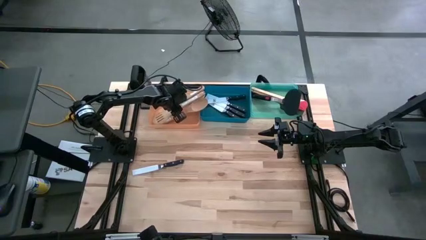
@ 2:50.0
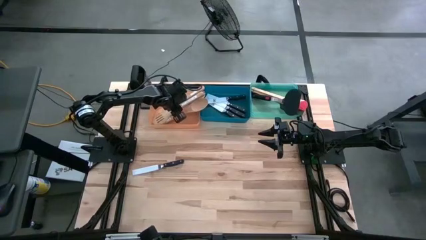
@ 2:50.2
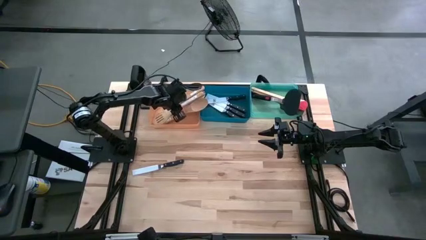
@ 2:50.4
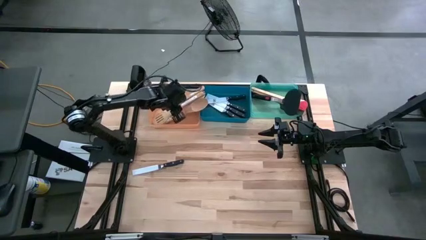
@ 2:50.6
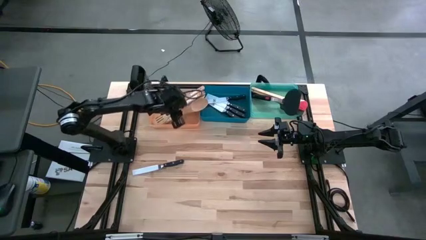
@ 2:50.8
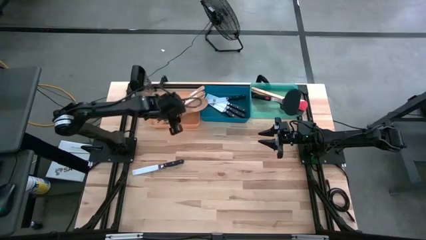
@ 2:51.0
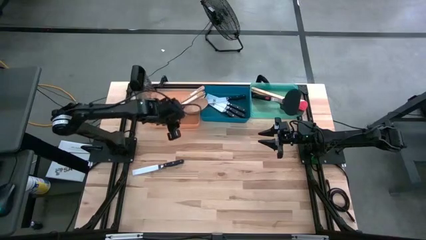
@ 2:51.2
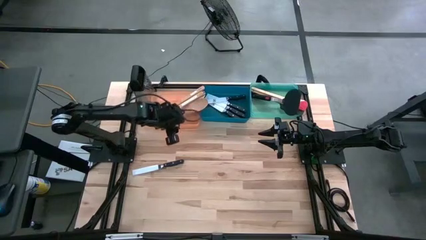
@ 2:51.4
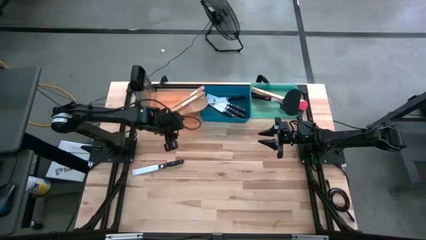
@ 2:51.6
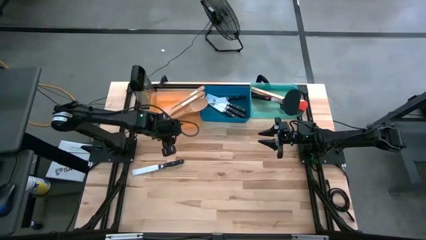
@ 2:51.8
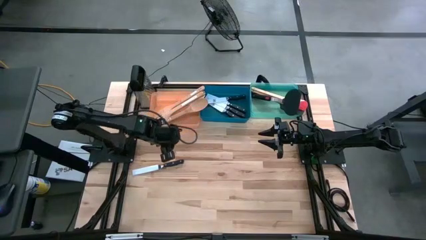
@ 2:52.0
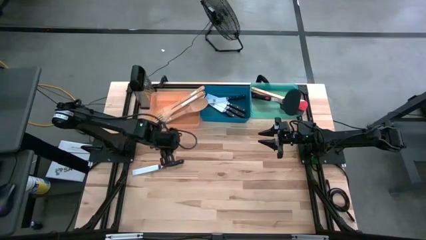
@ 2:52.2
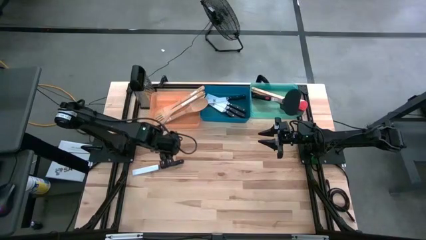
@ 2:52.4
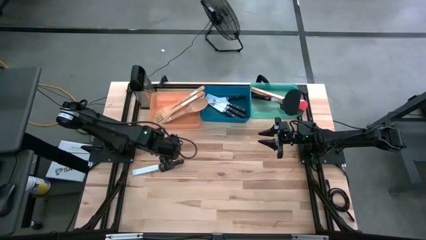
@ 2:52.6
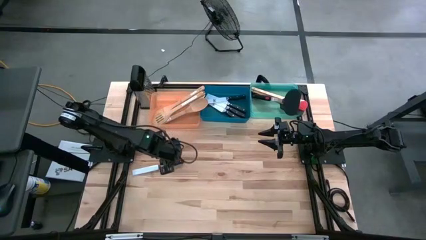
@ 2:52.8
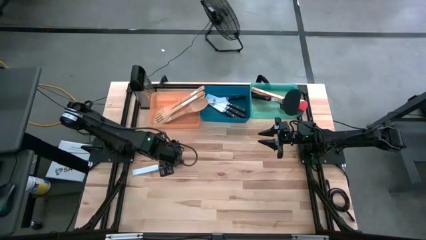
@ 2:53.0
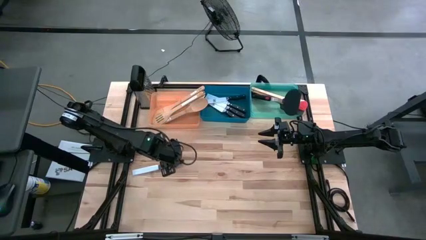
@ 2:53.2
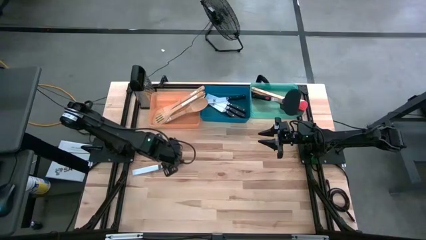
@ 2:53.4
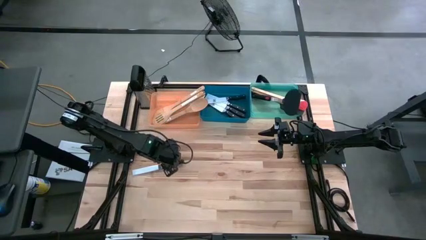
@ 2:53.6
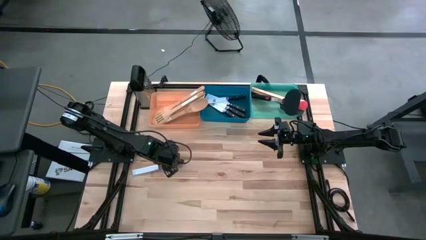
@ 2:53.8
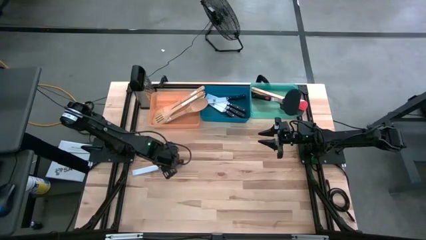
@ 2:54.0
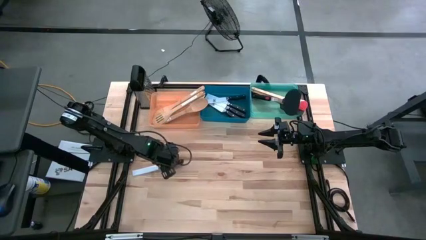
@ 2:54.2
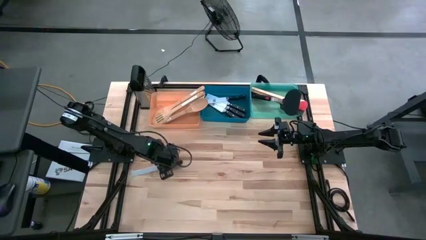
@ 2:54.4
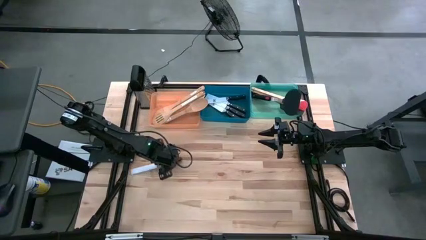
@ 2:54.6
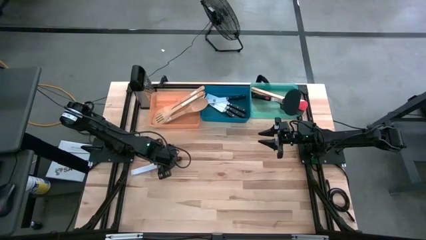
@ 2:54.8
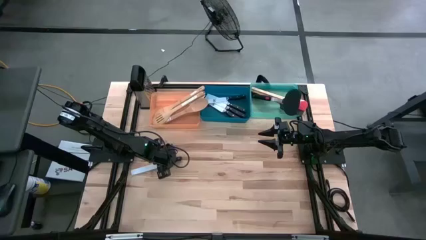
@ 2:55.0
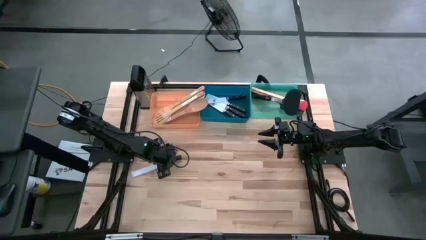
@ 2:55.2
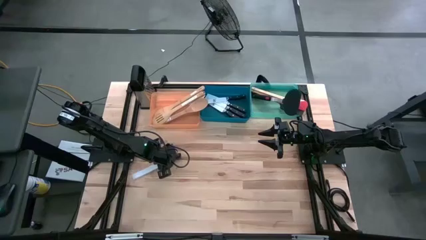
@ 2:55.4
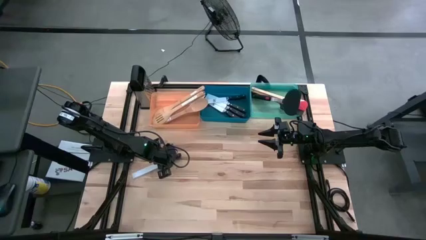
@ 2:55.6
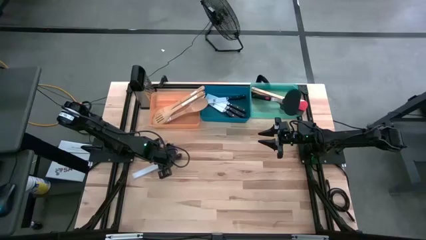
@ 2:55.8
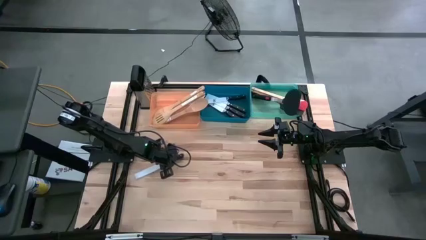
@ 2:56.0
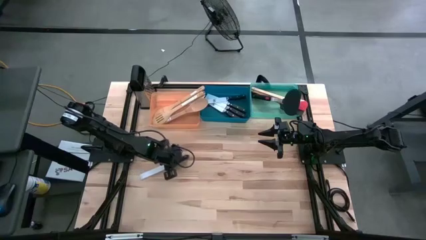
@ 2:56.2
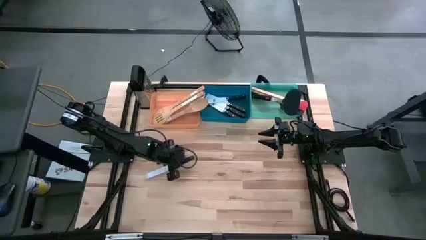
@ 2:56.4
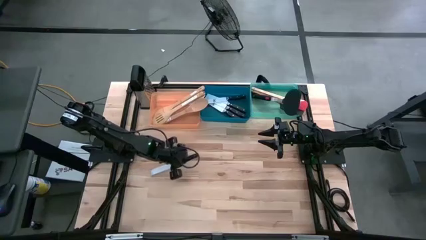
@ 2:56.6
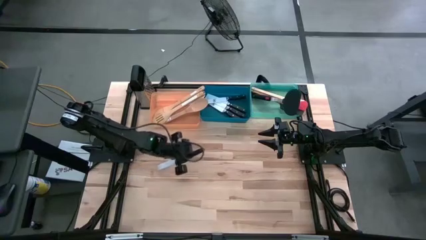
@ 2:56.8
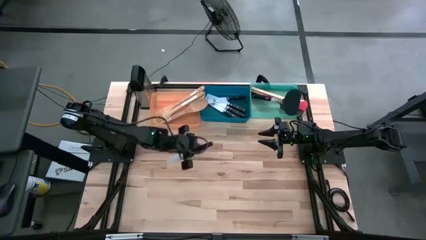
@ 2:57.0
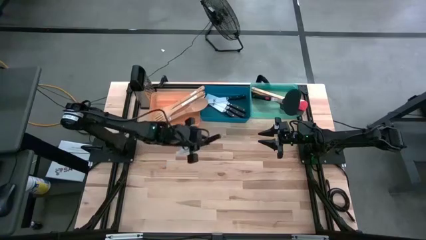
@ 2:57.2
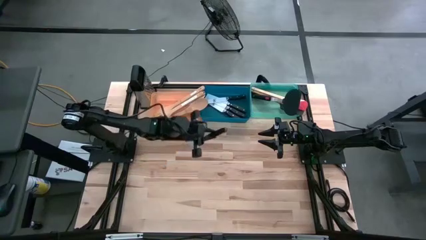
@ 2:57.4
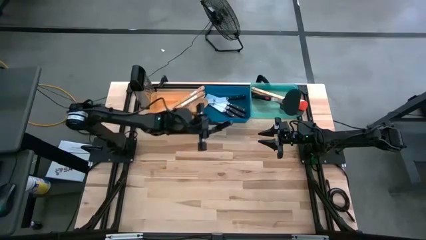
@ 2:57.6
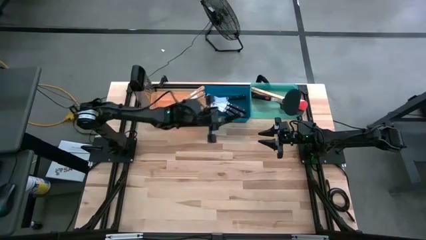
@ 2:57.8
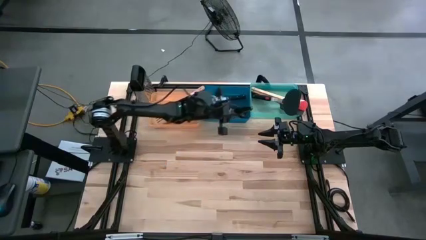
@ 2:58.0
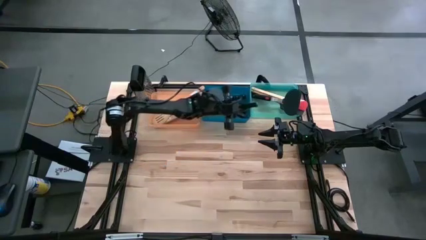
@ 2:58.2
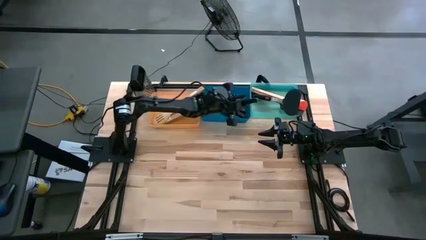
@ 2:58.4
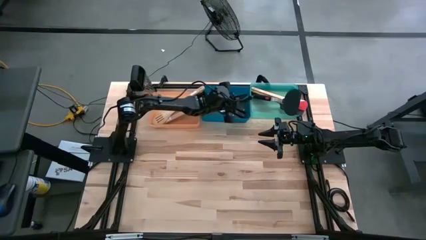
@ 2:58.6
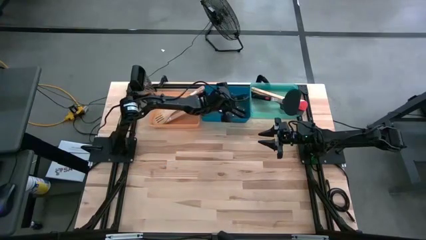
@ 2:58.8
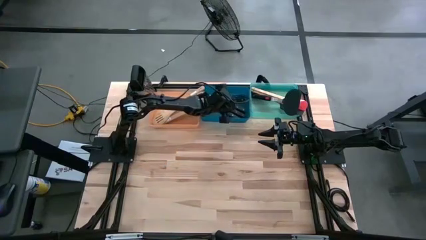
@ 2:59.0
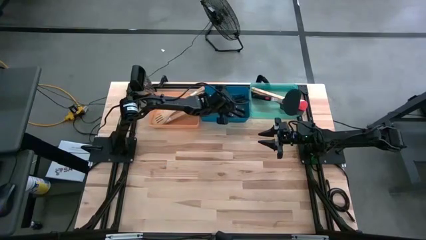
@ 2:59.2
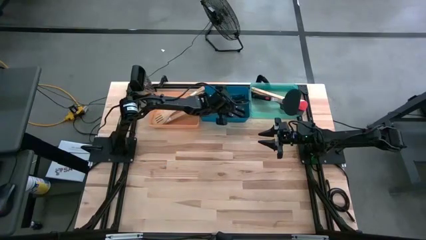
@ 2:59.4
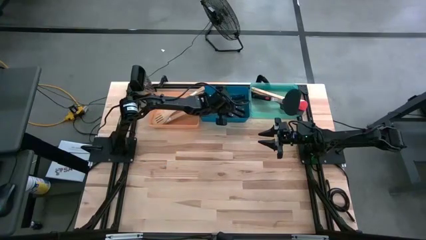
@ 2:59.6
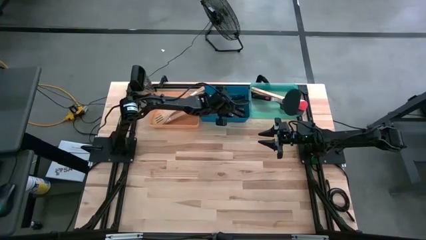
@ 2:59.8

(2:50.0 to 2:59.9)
Task: Pick & Place Kitchen Items
Put the knife into the blue bin

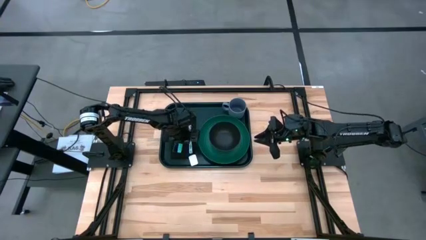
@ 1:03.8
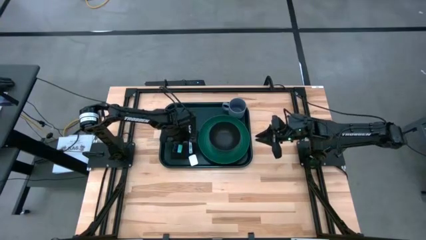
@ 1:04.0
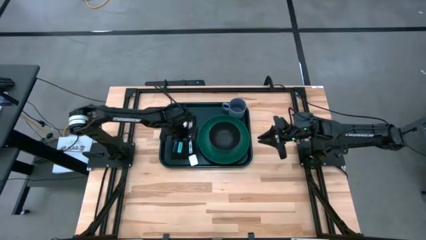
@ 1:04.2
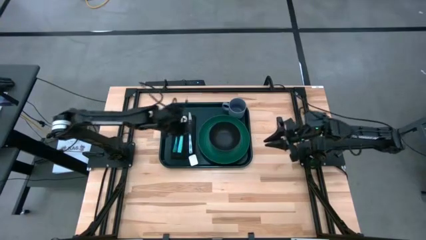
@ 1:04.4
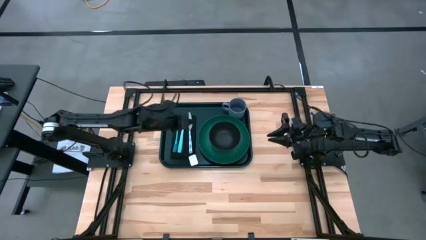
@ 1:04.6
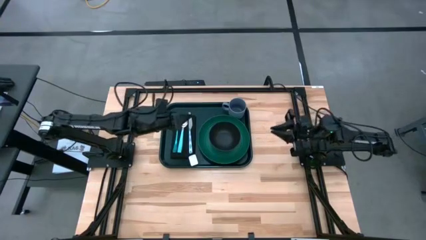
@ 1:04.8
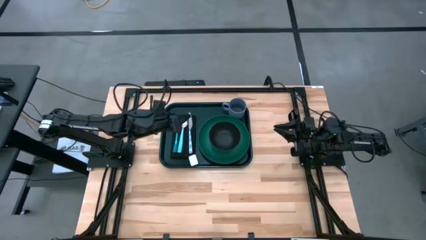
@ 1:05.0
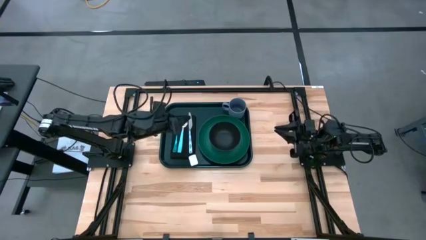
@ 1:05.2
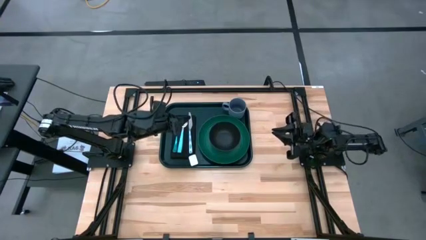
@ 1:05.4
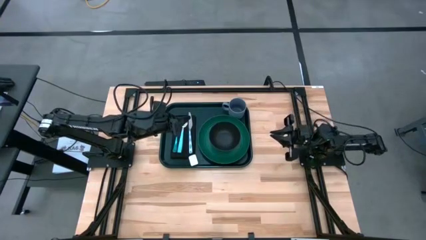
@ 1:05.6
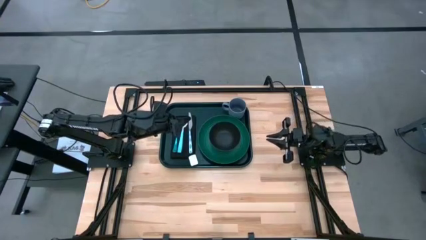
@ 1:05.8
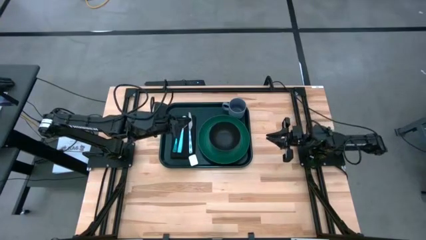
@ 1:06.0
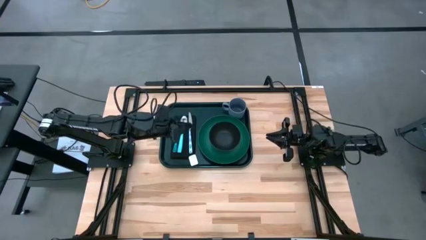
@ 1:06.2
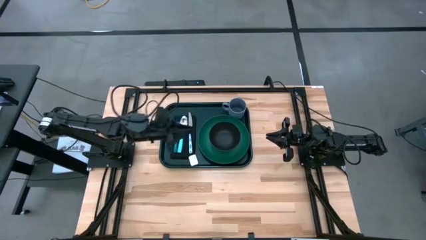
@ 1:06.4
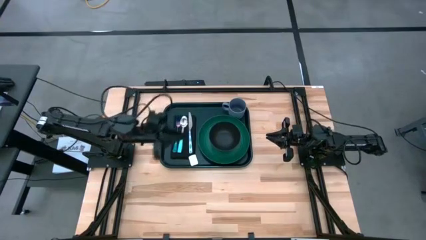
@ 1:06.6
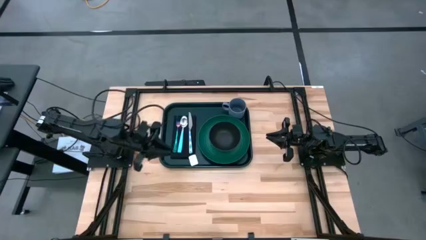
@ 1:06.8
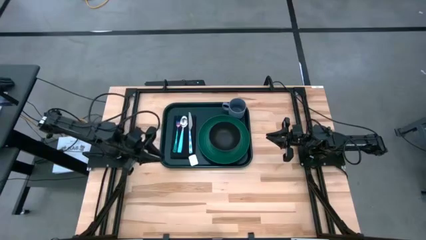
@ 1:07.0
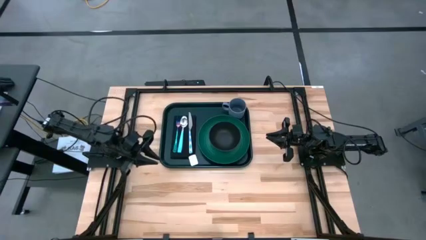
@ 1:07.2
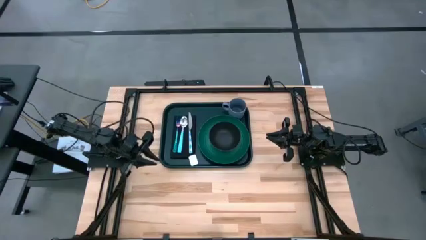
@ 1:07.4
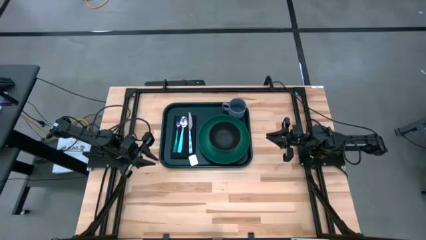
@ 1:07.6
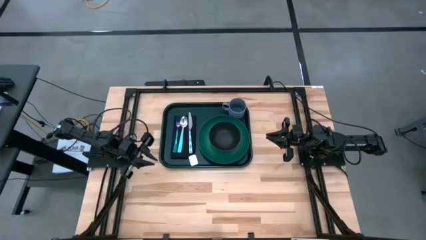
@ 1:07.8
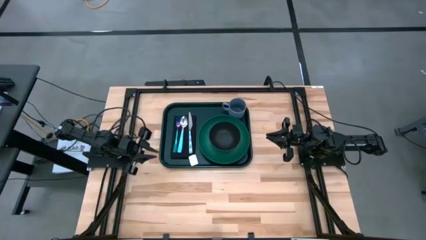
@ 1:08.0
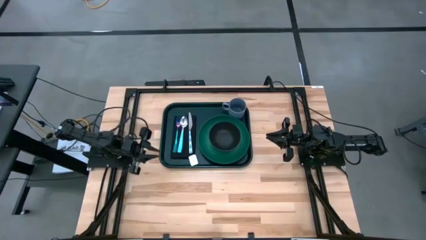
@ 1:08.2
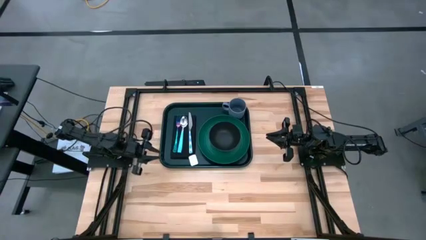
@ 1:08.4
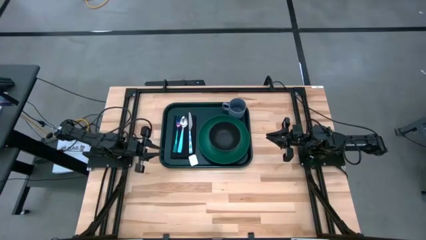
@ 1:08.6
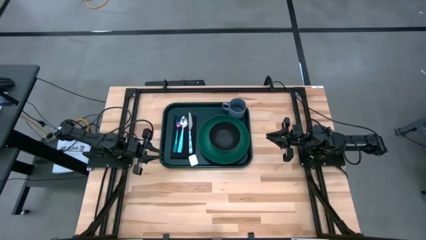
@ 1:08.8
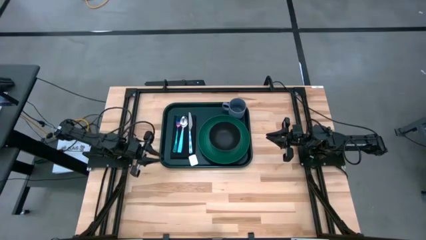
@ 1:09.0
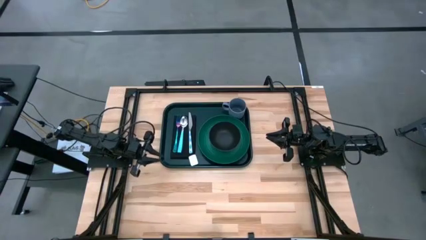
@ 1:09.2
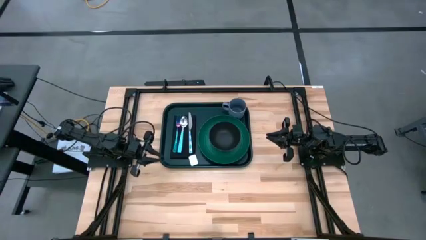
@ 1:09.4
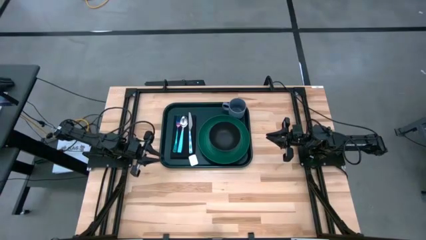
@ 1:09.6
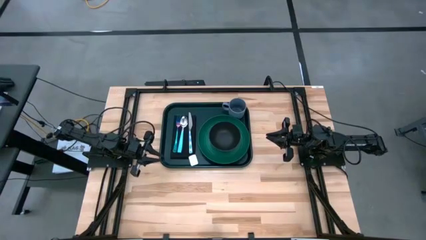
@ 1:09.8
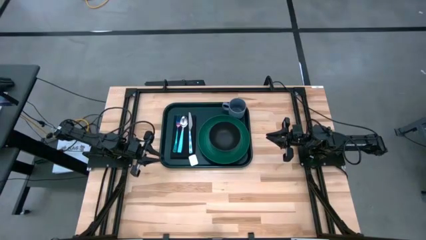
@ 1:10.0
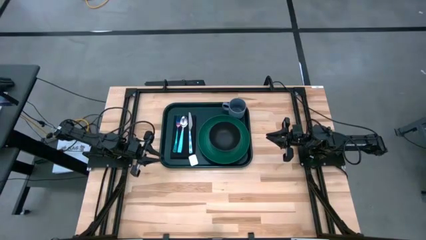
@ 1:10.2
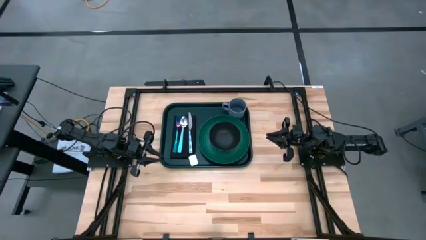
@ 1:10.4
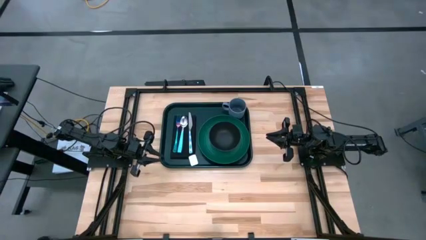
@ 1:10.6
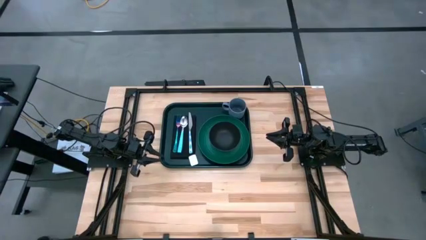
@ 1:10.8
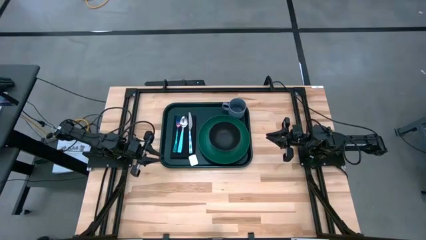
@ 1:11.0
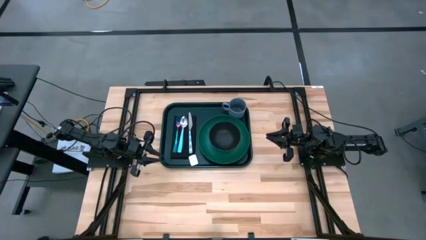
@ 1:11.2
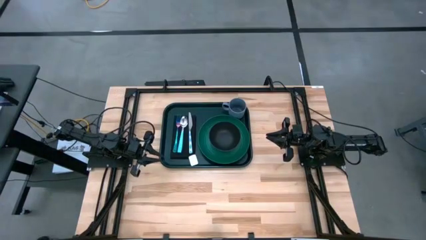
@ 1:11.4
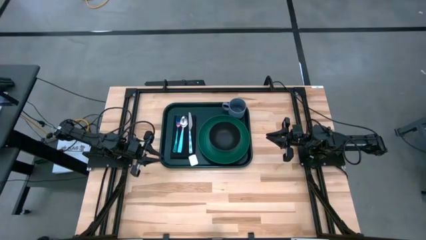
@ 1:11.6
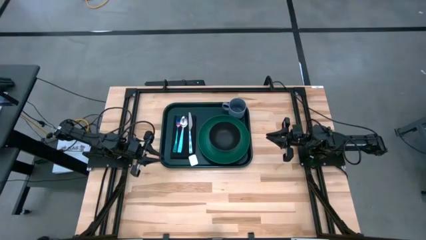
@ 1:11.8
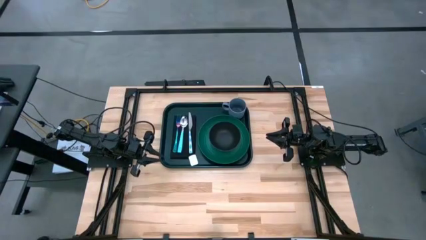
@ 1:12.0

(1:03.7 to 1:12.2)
Task: Set up tray
Return to Home Position
